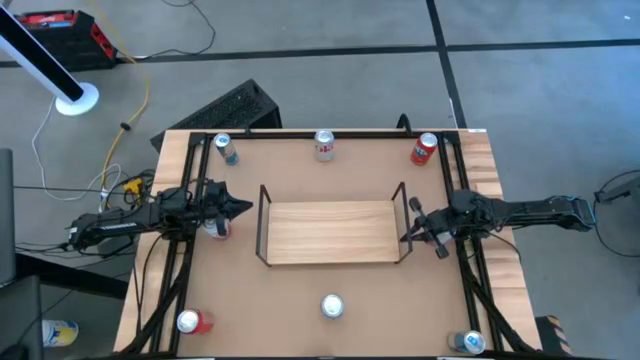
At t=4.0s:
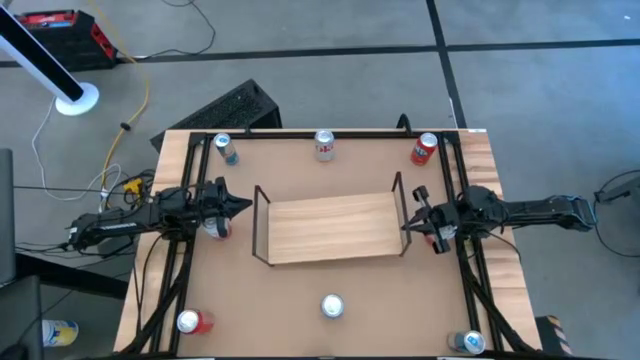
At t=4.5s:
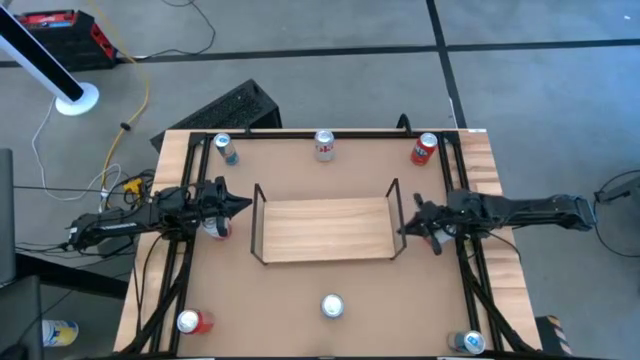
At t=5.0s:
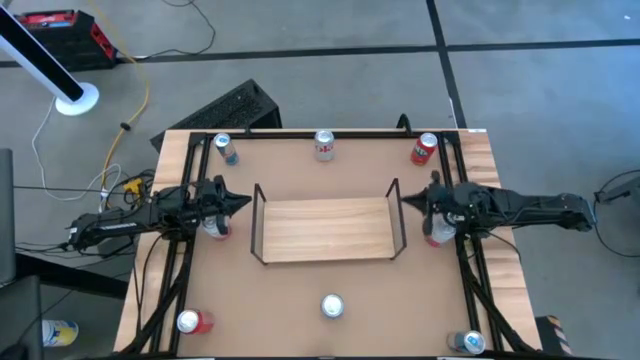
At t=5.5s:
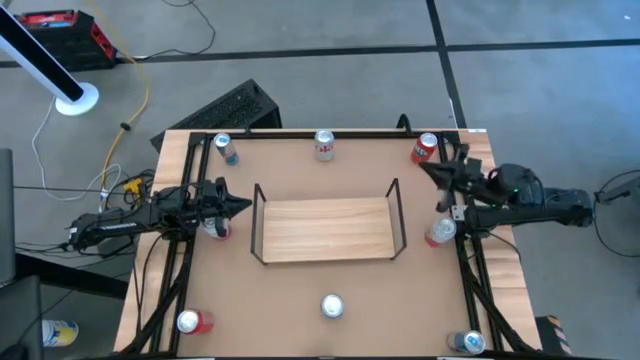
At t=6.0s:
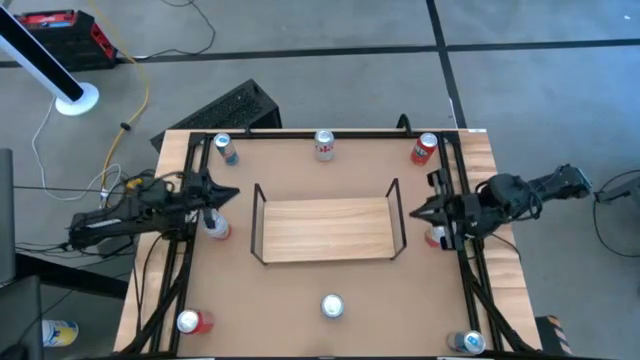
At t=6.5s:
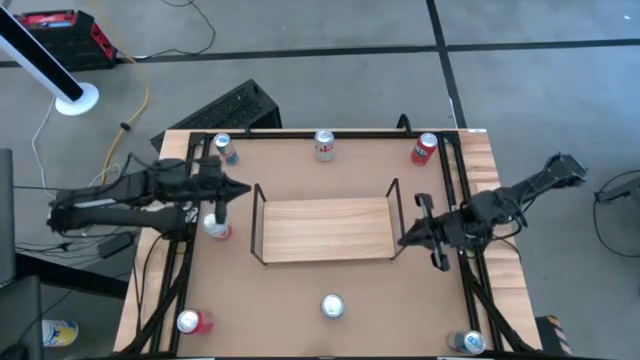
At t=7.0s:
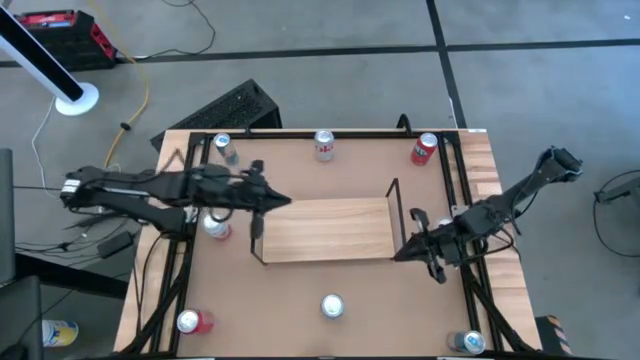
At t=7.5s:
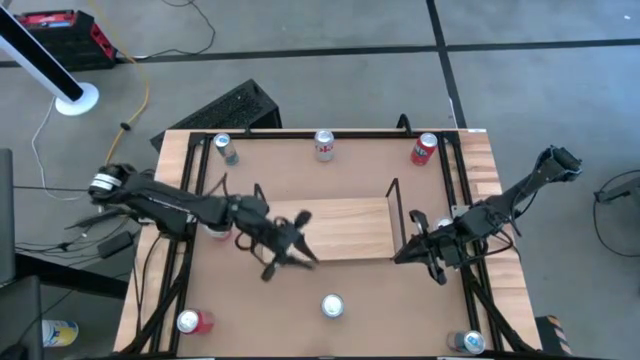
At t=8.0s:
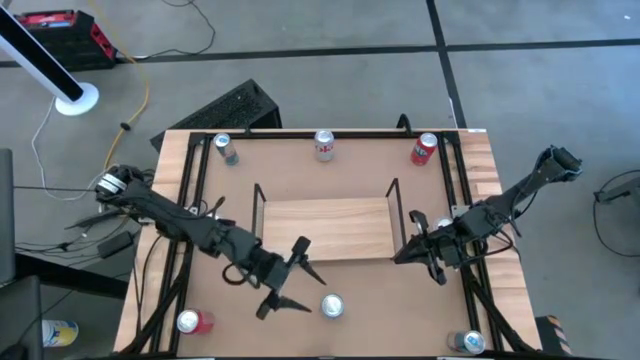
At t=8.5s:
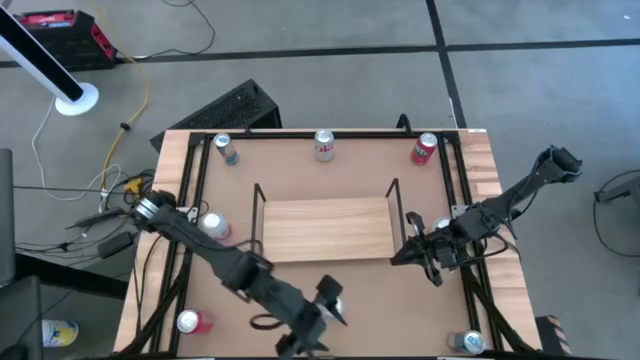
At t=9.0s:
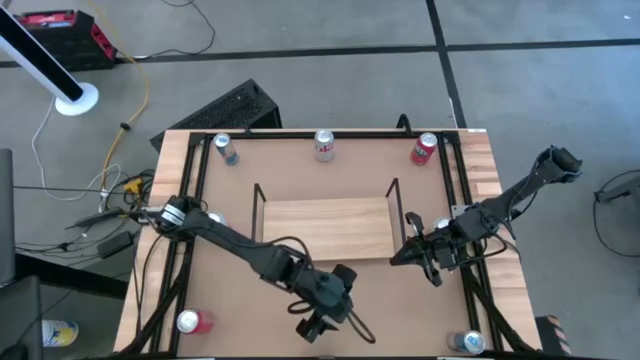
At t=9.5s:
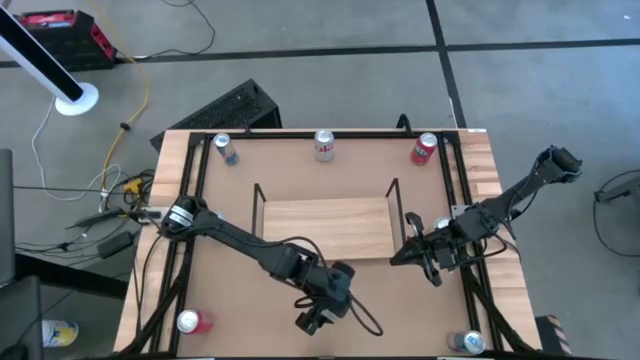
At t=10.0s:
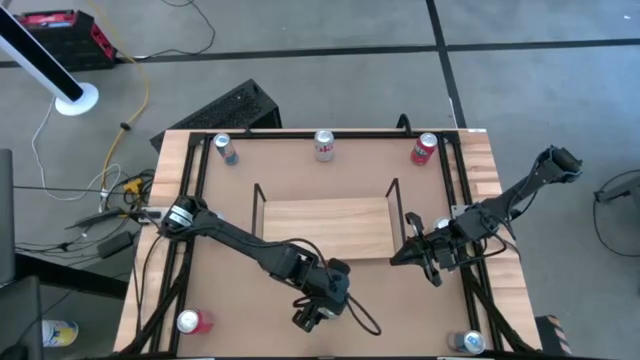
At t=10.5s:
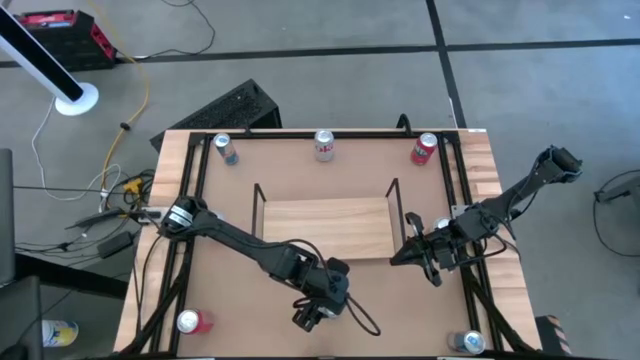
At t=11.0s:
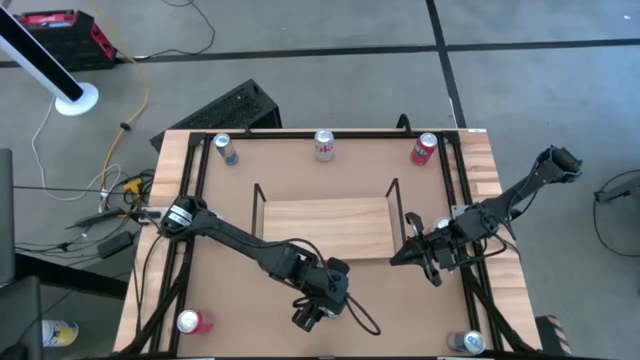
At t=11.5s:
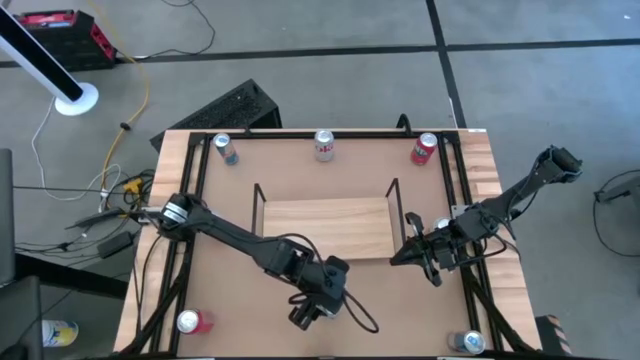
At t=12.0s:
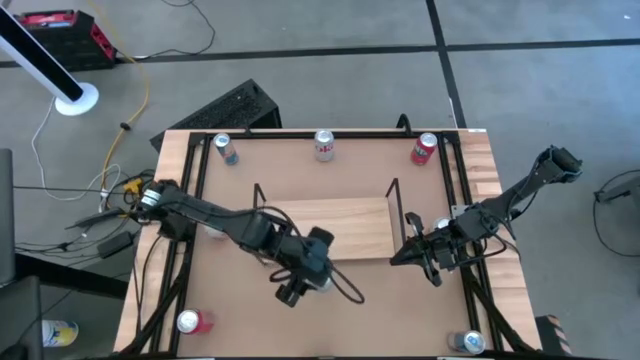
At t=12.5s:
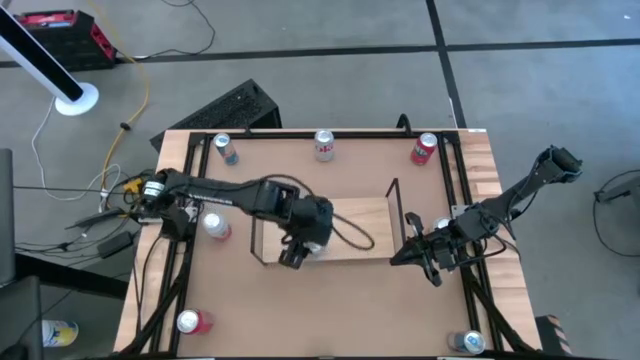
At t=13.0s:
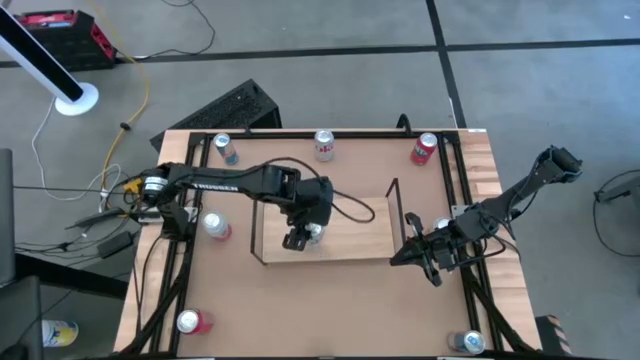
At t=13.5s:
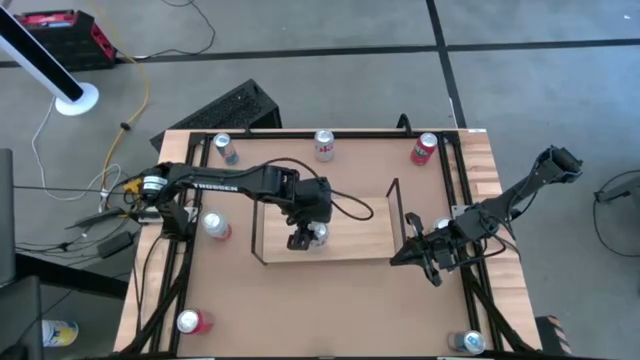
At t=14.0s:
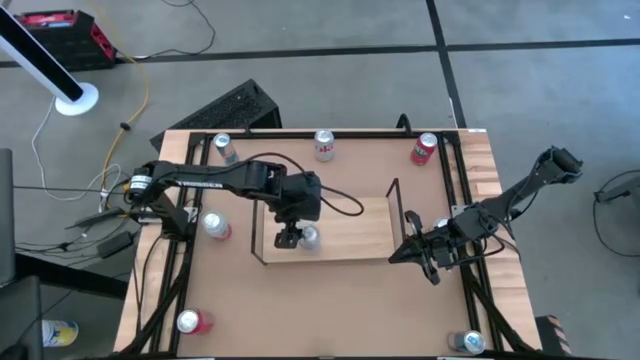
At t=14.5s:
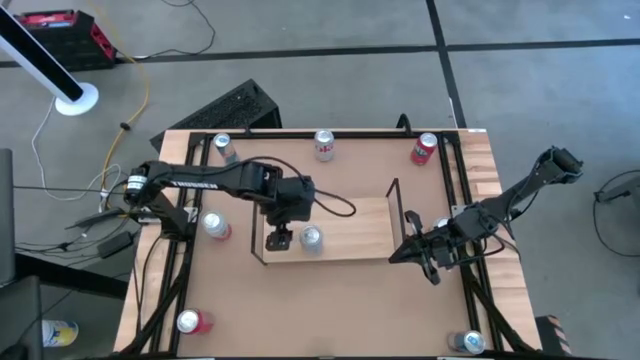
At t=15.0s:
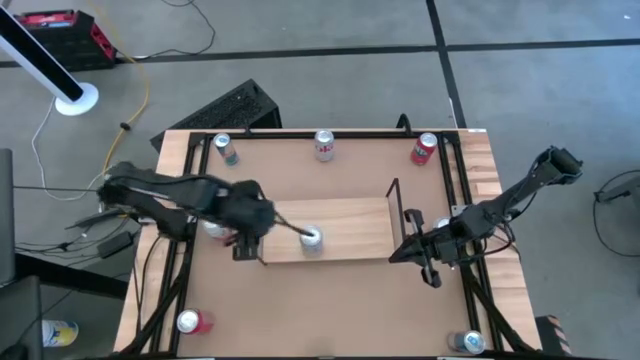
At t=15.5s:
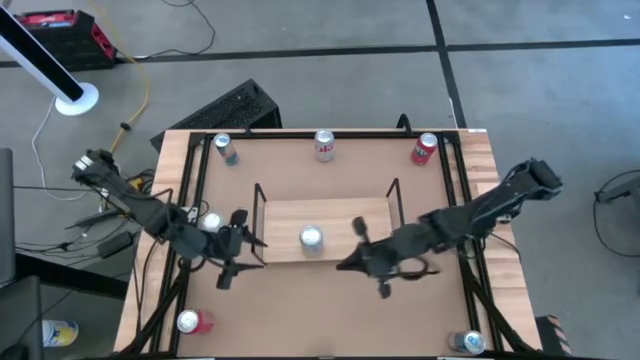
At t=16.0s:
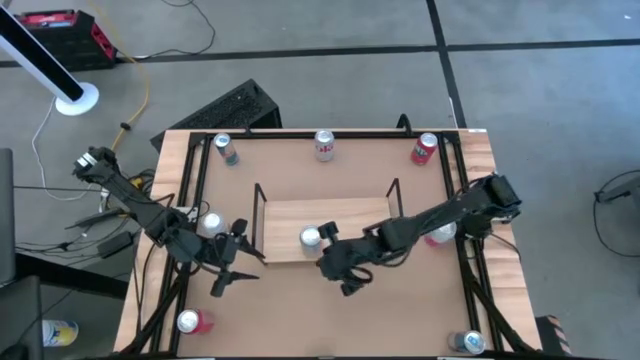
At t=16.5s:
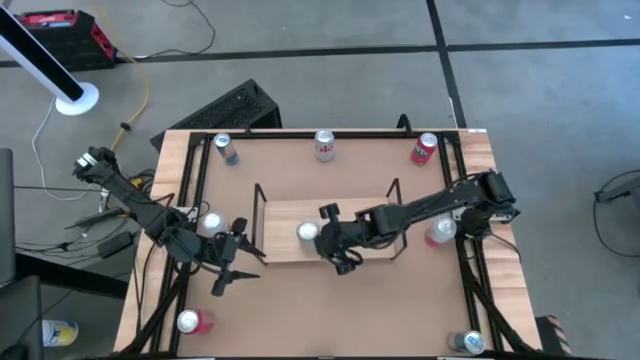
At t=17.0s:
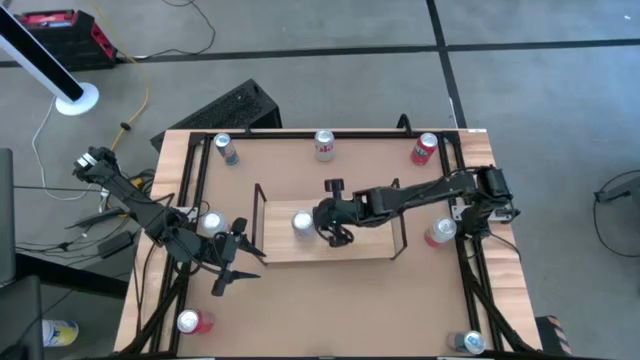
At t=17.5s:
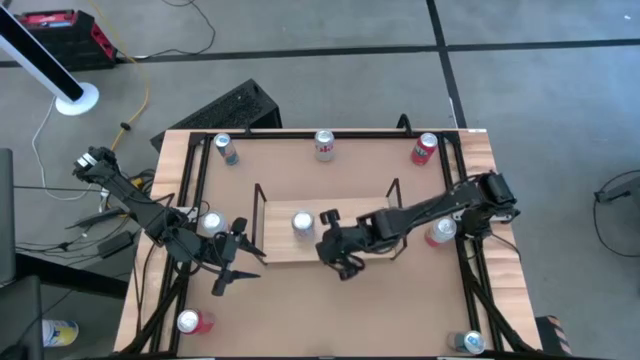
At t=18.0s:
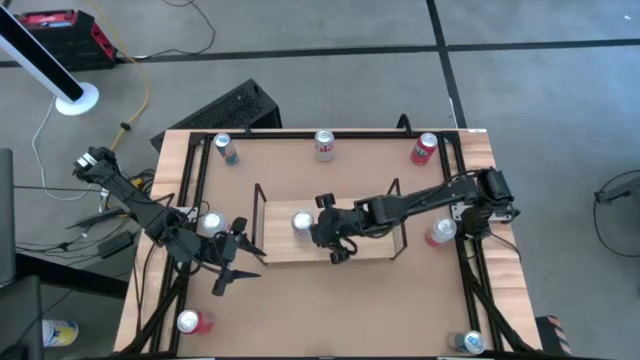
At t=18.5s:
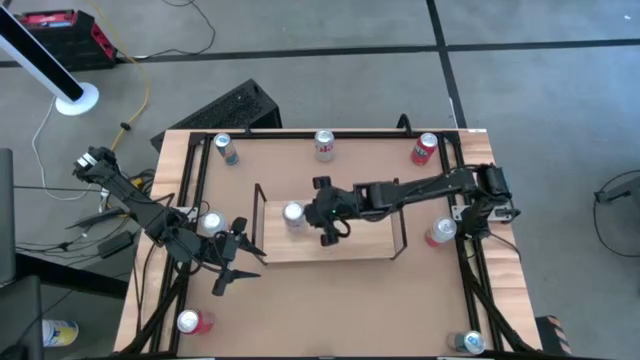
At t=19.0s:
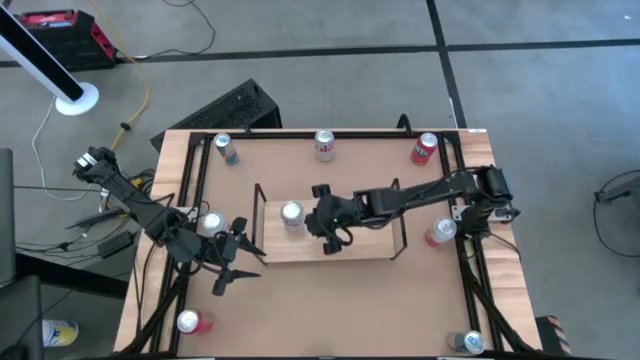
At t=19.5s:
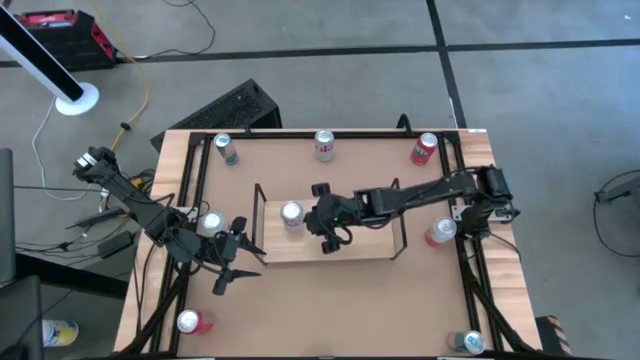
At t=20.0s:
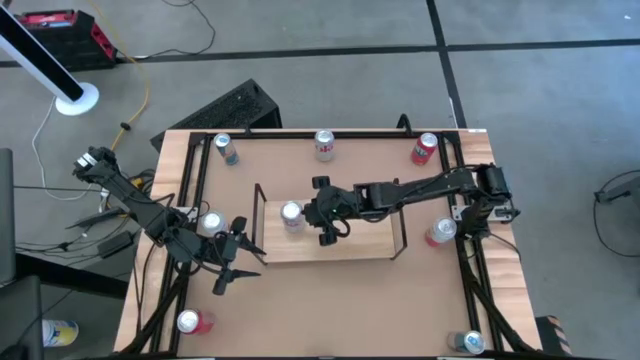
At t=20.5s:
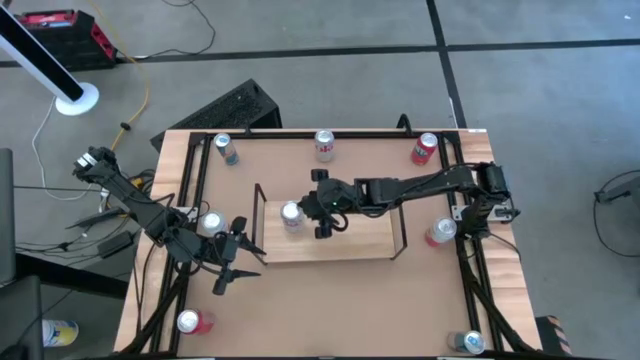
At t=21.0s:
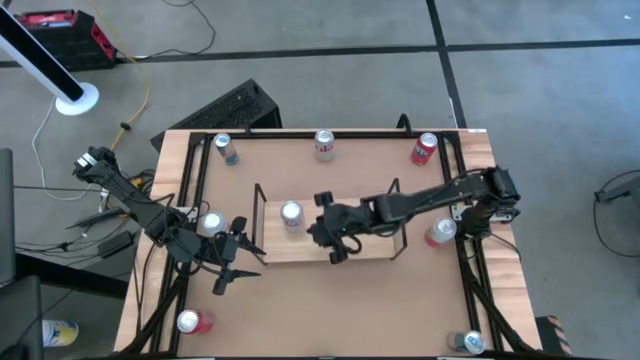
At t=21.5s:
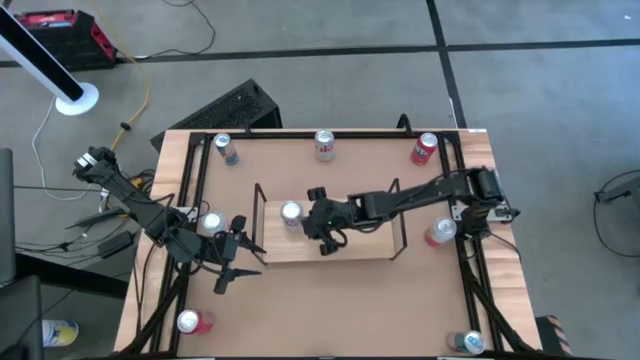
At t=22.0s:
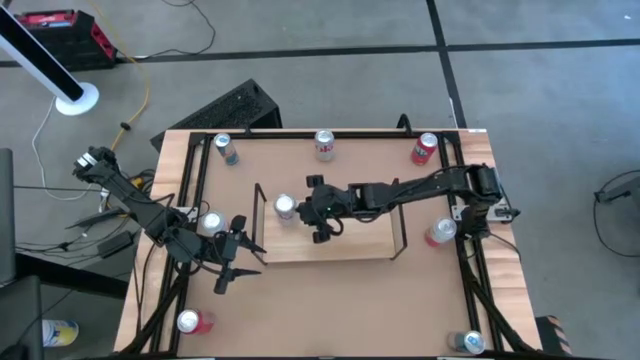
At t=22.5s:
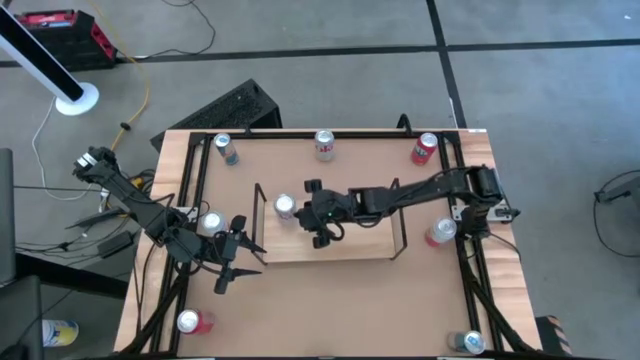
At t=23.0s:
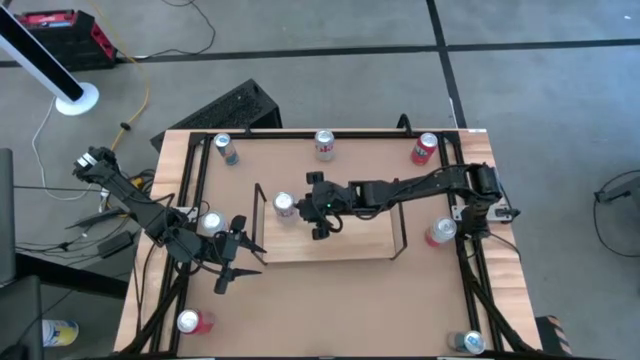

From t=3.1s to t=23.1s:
Task: Place canned beverage on shelf
Put the bottom silver soda can on the shelf

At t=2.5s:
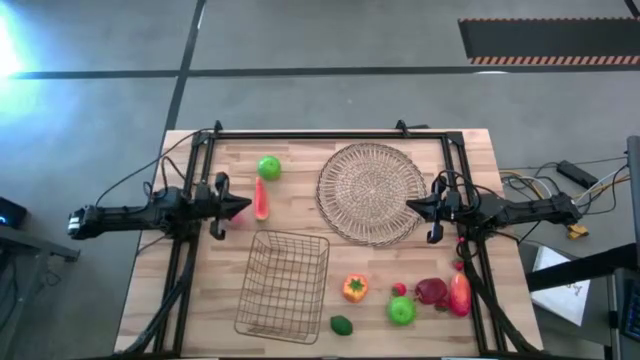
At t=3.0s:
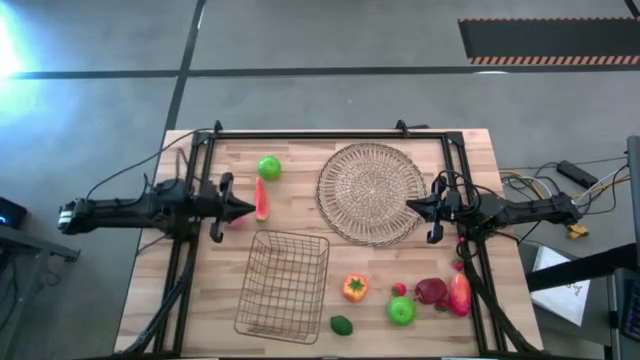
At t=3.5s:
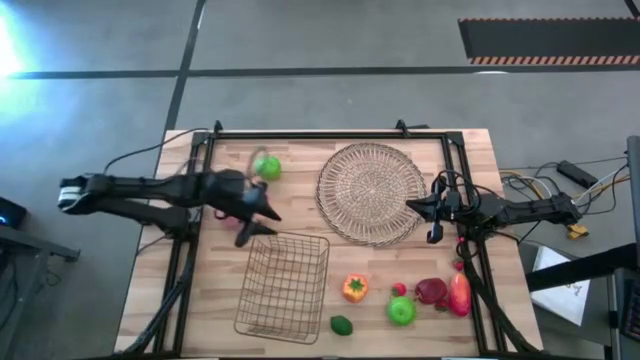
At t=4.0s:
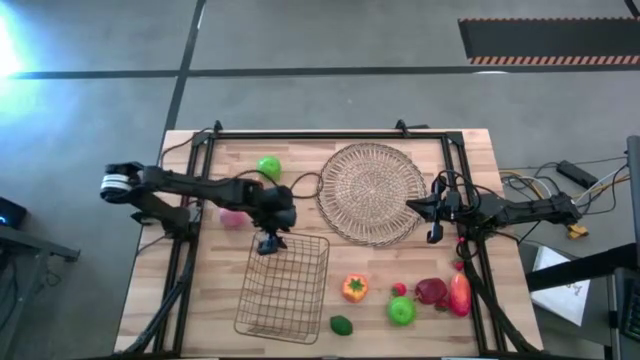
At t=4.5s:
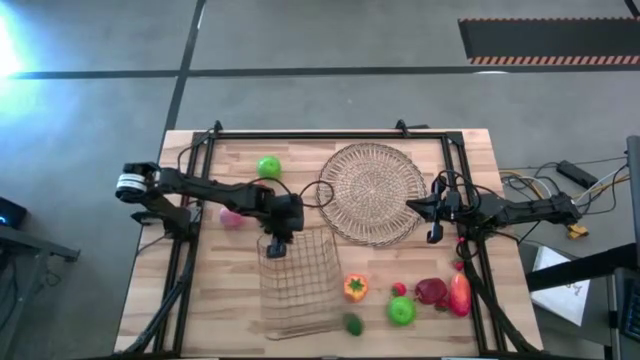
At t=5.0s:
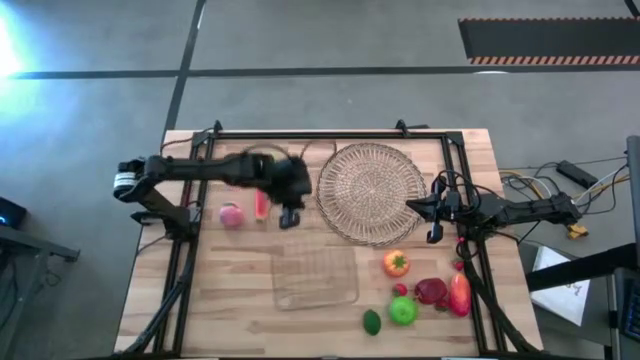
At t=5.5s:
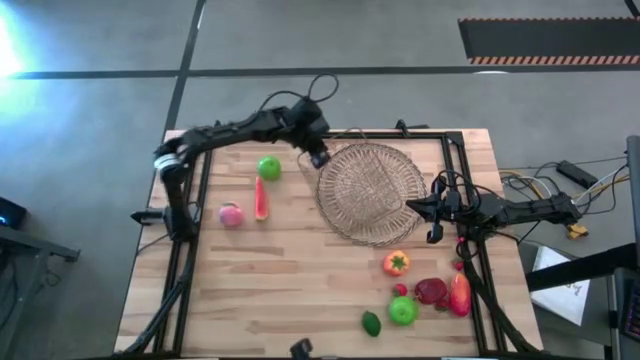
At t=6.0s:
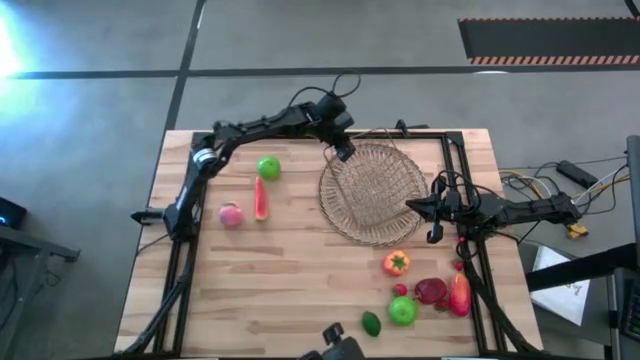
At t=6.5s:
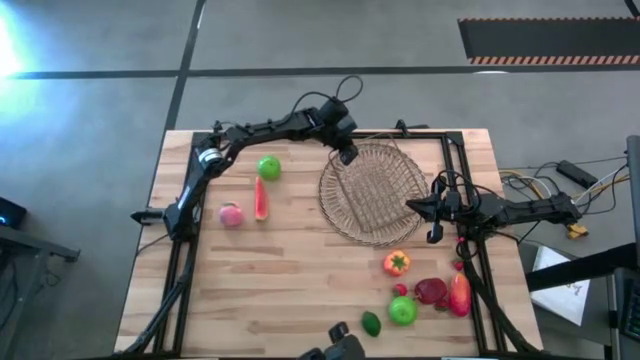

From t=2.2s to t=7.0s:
Task: Build produce basket
Put the gold mesh basket on the brown mat
